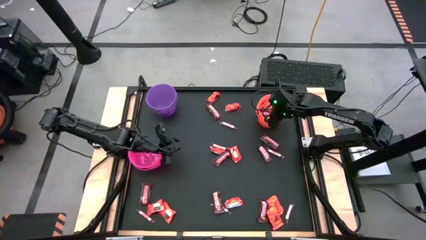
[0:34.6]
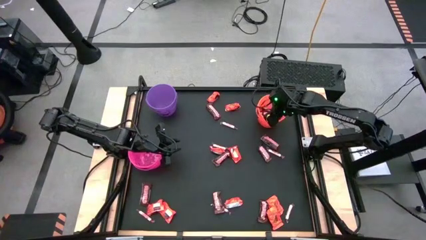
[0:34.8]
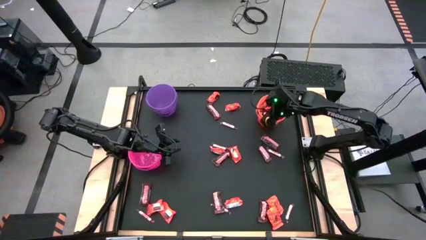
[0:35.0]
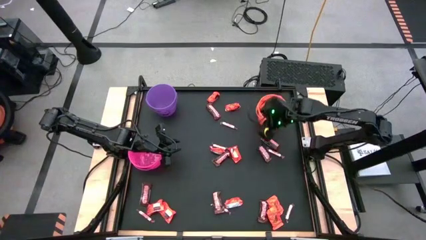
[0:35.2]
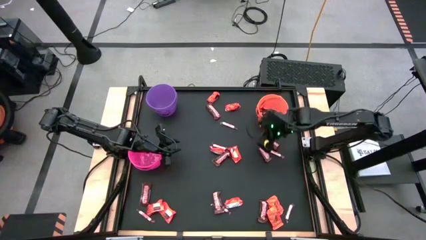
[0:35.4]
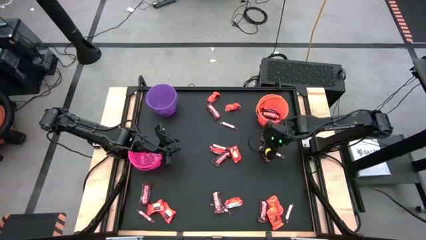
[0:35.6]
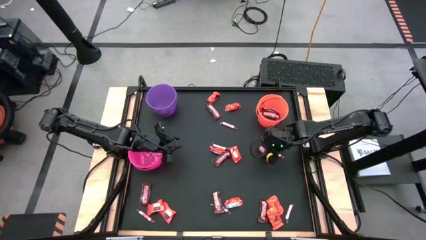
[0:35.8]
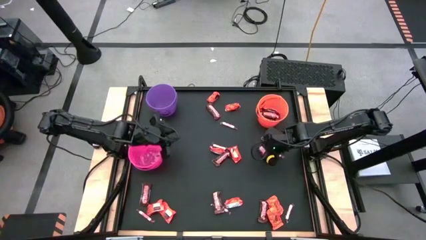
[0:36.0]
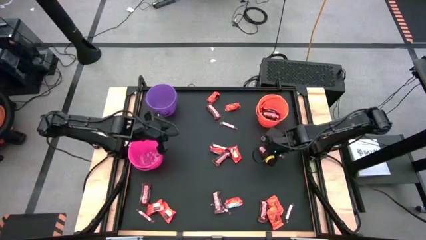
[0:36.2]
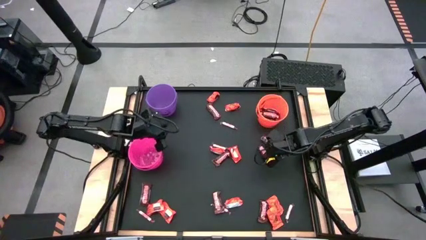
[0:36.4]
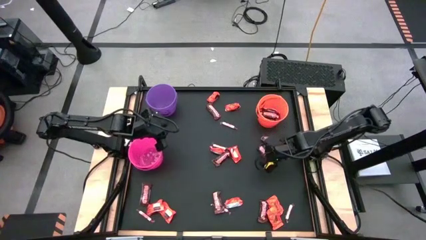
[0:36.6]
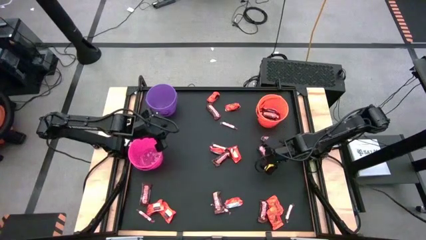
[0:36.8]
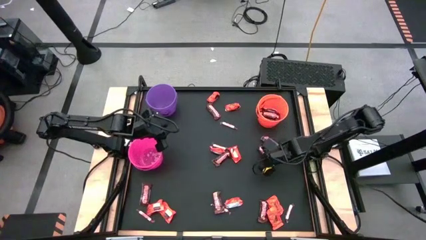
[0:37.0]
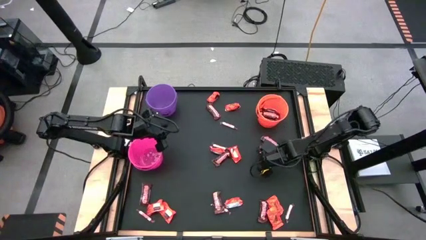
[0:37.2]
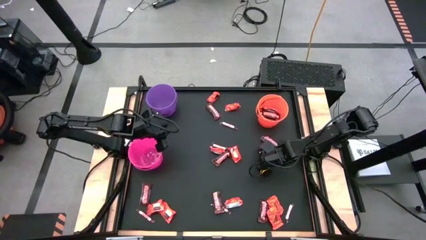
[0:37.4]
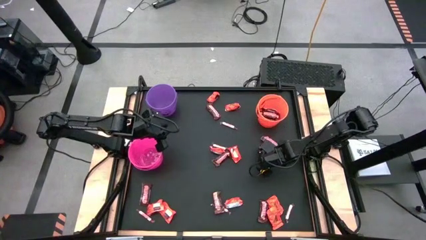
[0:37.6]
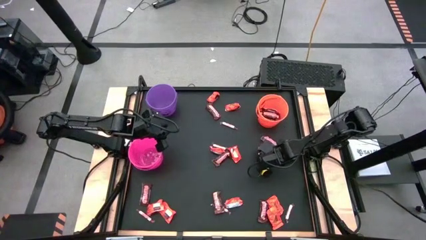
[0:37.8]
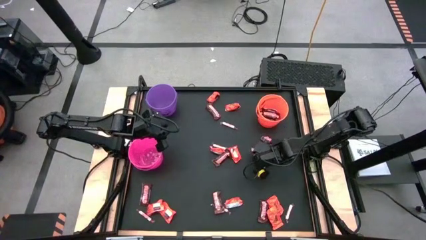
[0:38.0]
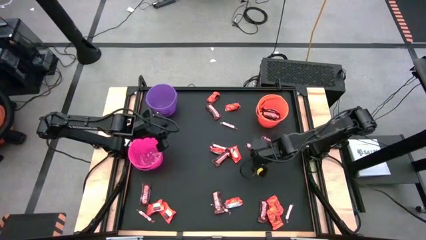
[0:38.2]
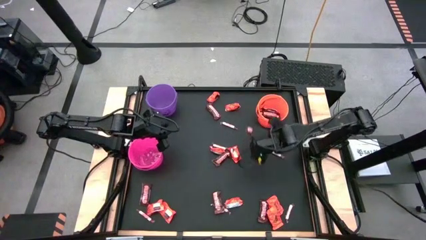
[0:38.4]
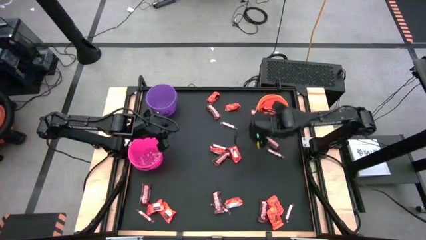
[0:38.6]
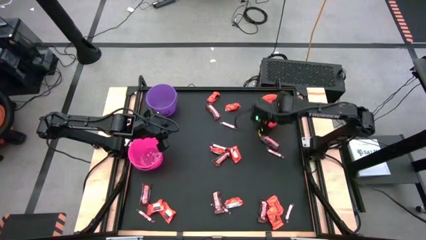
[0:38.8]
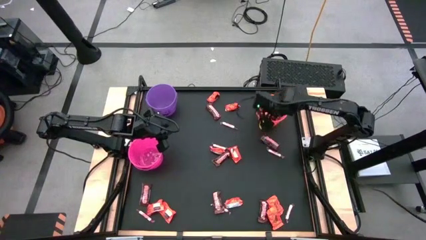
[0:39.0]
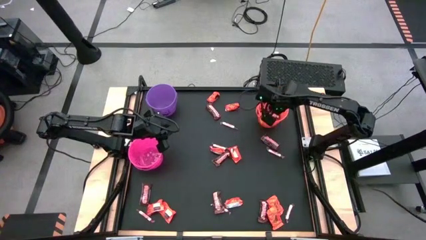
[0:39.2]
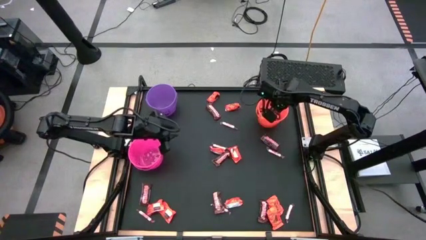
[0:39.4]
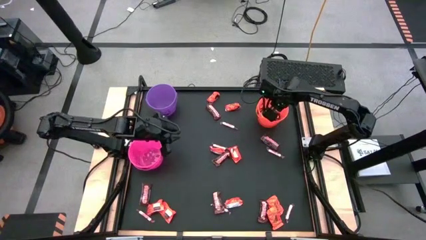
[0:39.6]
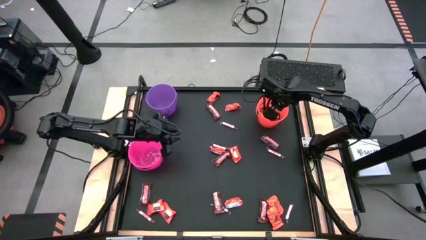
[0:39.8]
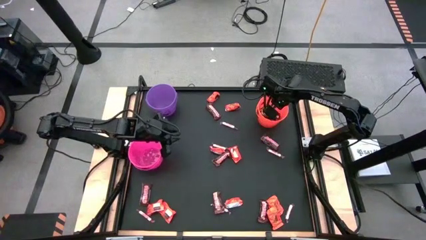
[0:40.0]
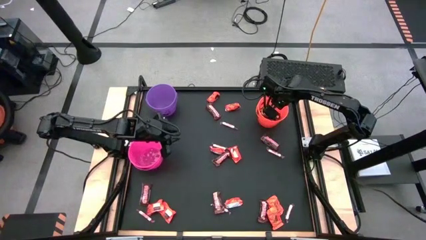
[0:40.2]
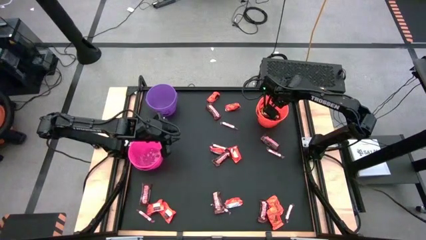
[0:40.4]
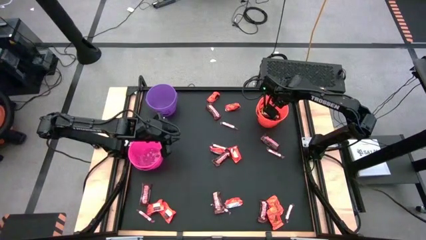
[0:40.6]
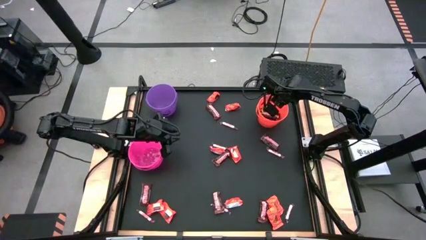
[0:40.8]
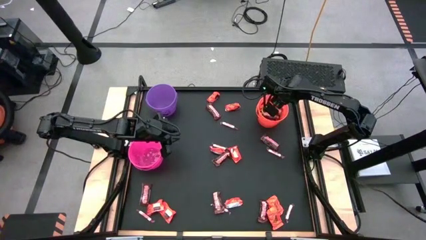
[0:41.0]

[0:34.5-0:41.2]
Task: Sort candy by brand, put in halloween buckets
Put the brown candy into the orange bucket

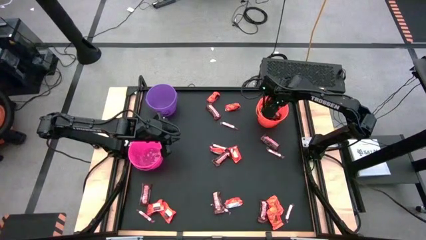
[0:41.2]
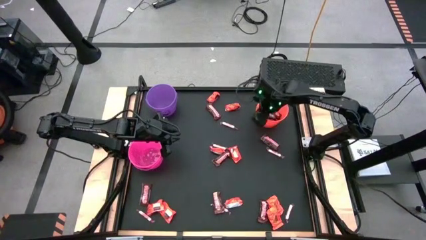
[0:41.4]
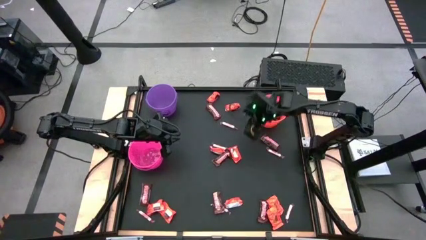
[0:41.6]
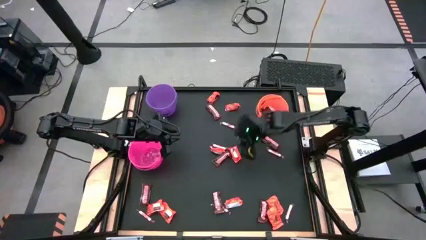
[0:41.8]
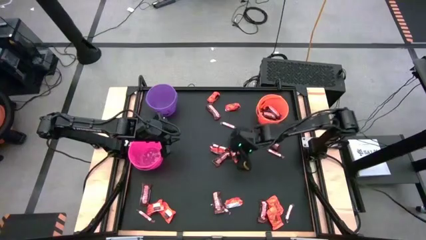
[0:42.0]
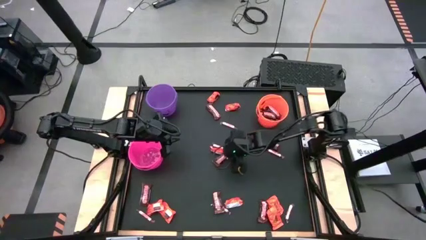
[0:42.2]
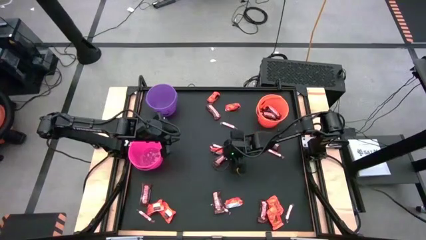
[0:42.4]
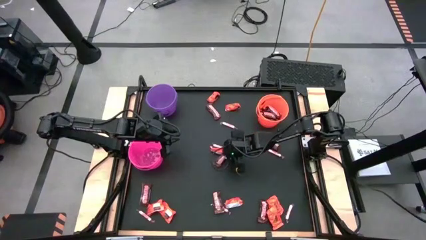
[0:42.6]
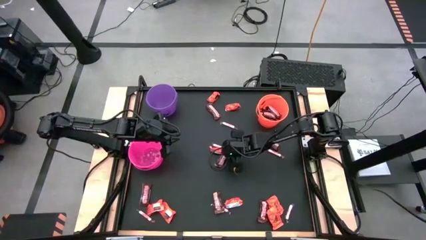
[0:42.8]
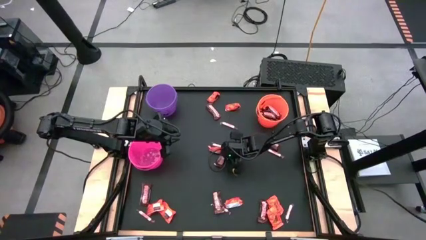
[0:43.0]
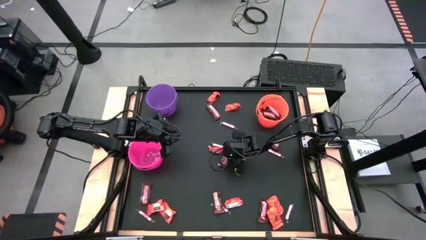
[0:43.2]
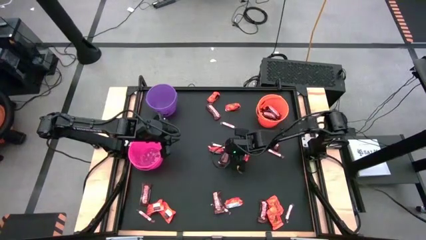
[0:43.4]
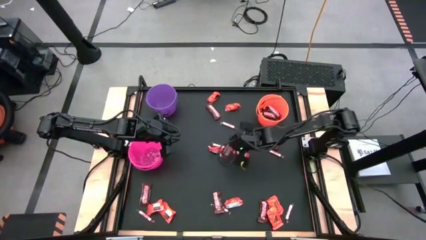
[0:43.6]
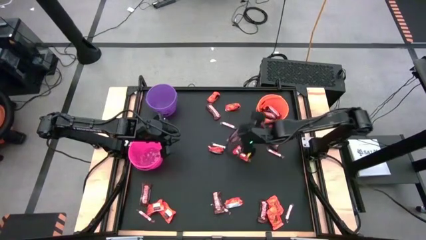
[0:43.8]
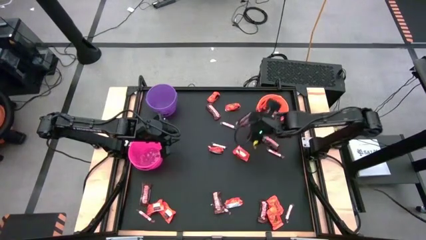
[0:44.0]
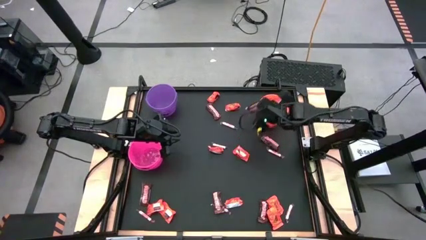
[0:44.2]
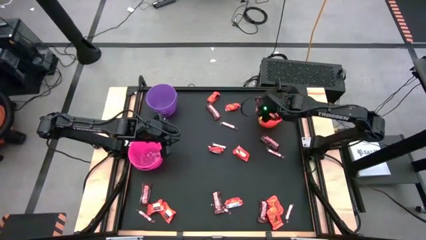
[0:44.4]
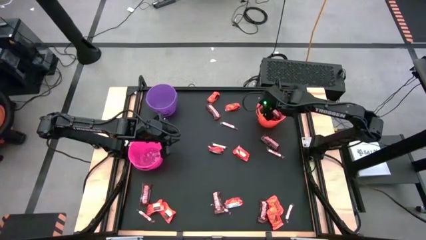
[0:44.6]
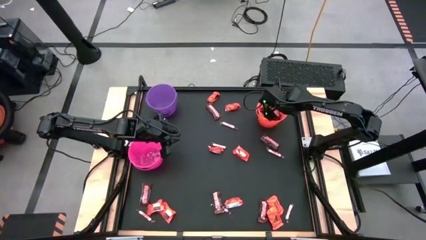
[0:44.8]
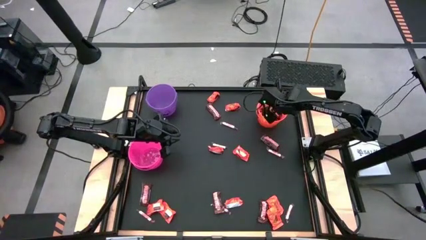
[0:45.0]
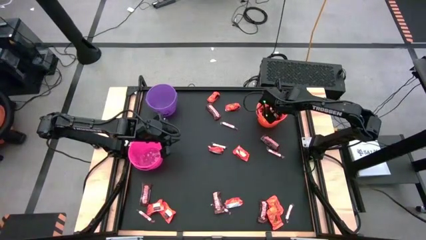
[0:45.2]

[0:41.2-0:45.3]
Put the brown candy into the orange bucket

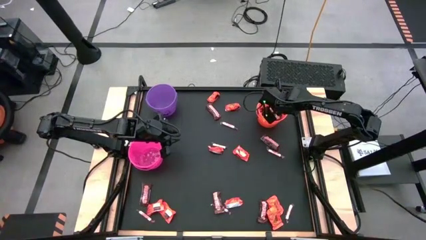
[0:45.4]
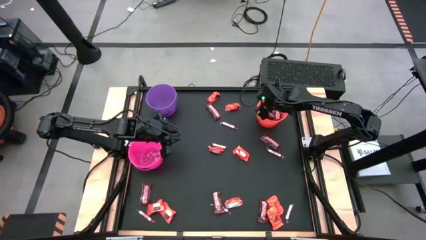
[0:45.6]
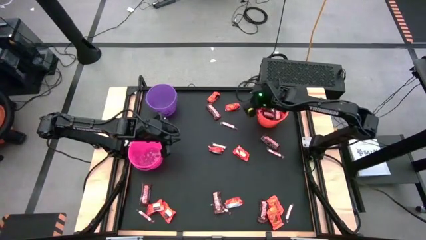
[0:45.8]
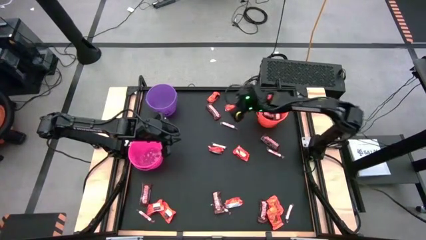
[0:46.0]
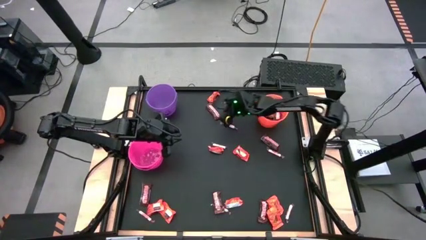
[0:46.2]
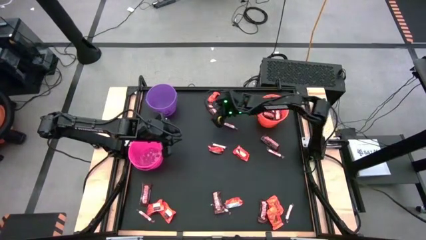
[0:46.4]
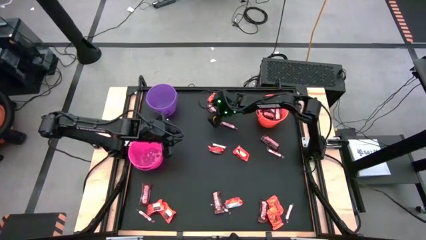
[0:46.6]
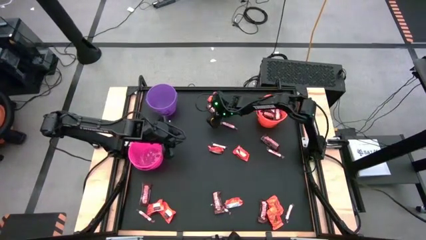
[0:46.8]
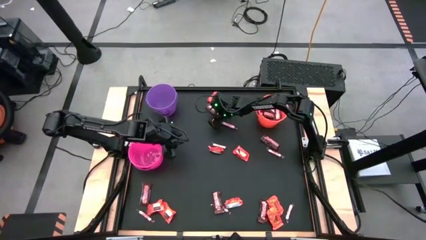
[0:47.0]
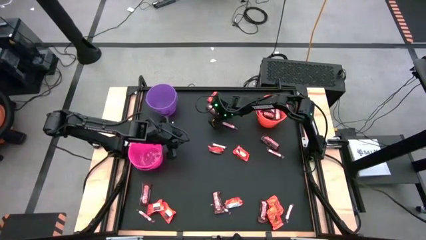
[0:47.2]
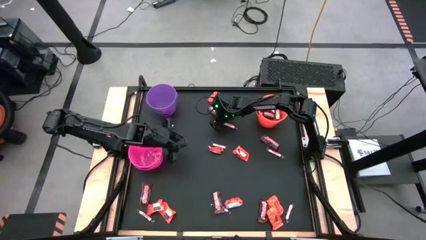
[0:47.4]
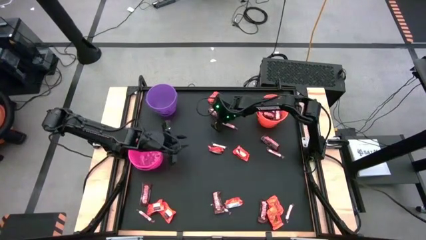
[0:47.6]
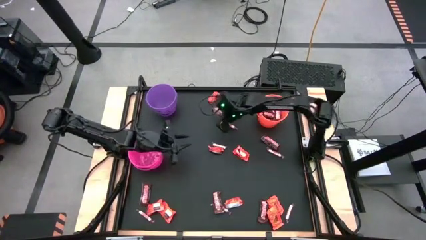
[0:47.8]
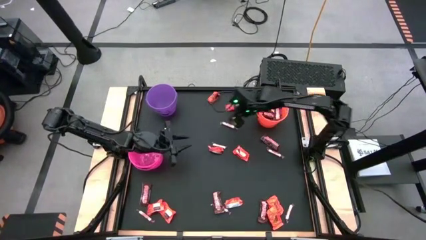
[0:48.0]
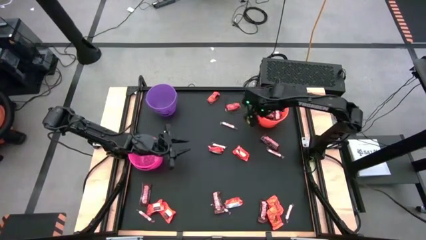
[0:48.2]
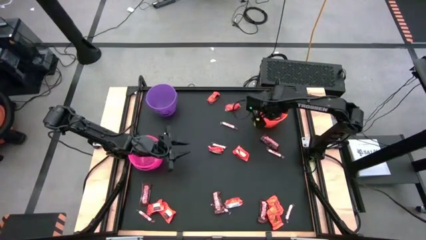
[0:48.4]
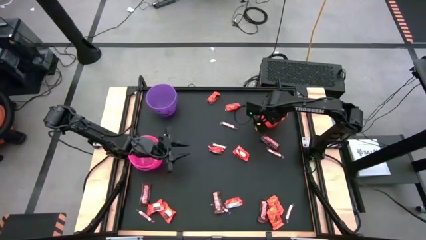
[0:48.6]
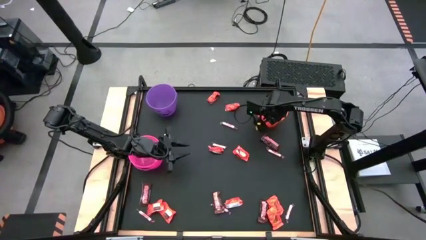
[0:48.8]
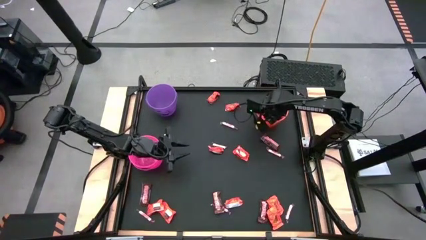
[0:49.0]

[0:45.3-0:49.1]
Put the brown candy into the orange bucket

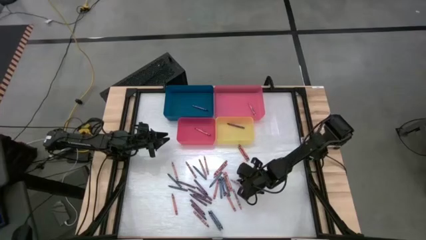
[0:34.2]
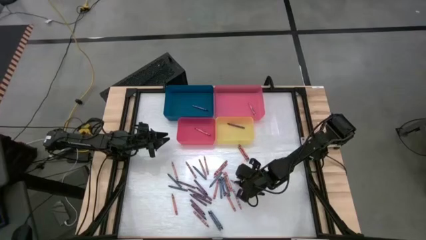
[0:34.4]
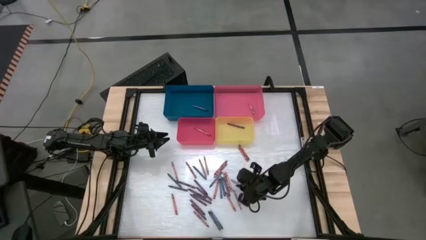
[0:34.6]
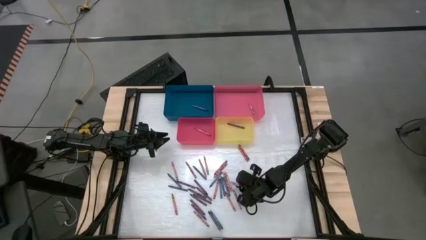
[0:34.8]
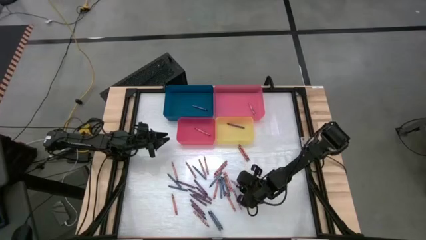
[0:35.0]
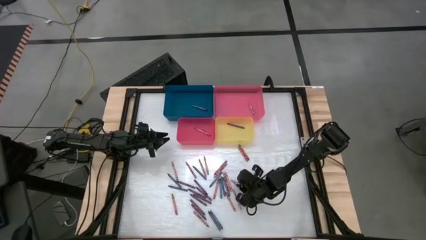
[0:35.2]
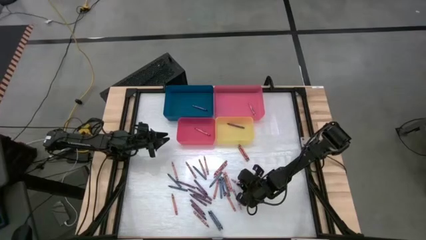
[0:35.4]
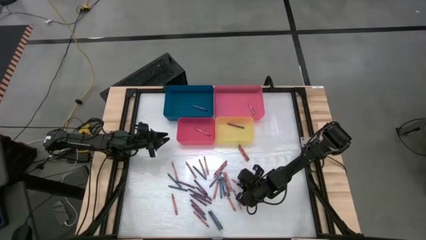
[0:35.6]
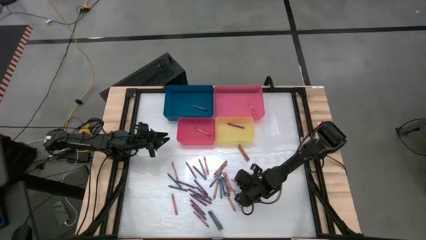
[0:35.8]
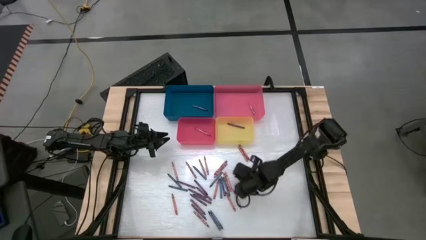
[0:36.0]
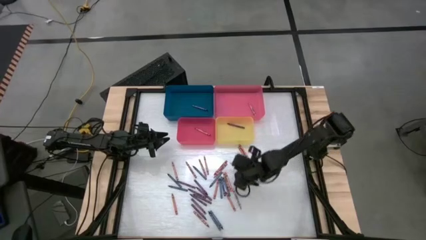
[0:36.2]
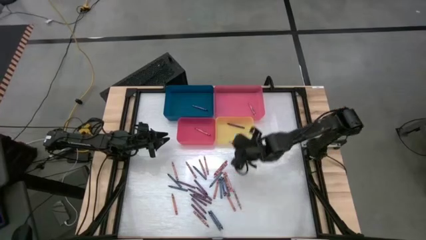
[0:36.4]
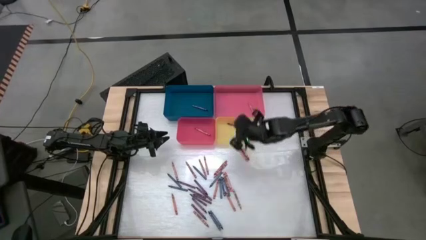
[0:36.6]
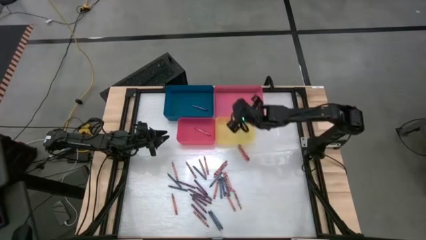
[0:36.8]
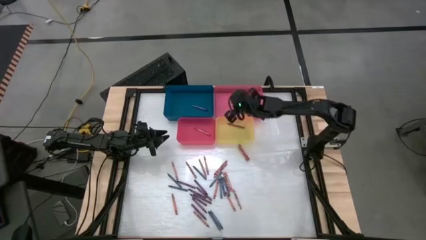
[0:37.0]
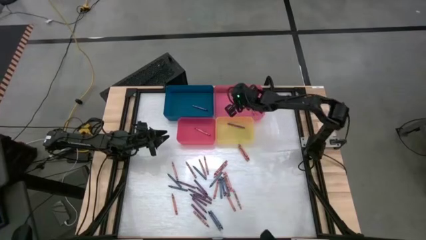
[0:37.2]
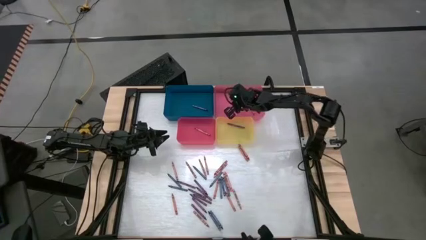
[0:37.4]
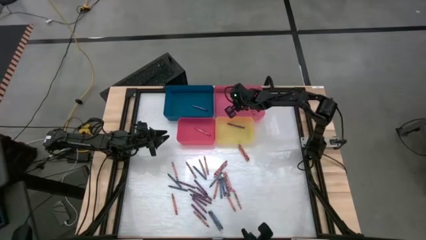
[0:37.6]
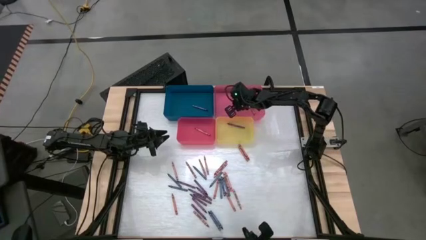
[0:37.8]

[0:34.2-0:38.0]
Task: Sort crayons
Put the pink crayon into the pink bin
